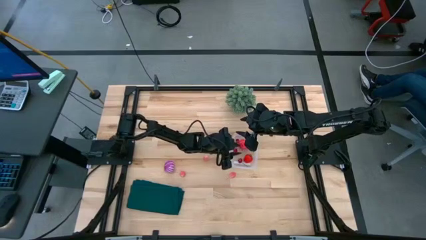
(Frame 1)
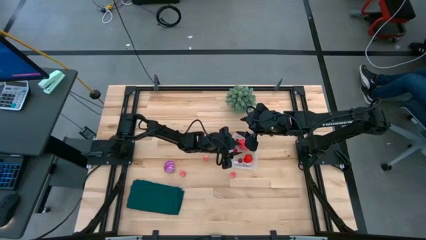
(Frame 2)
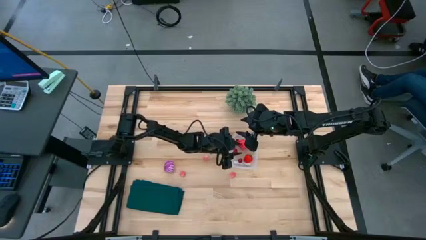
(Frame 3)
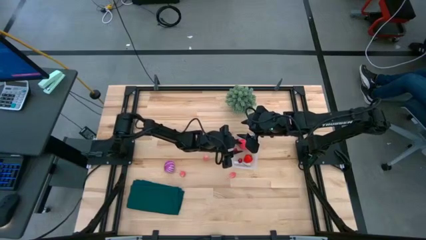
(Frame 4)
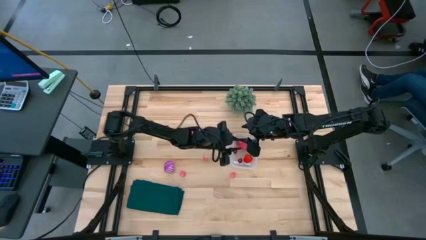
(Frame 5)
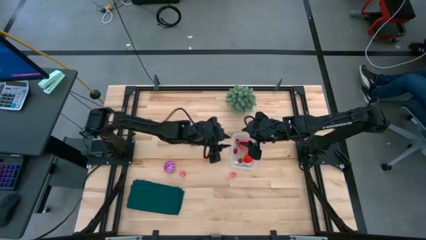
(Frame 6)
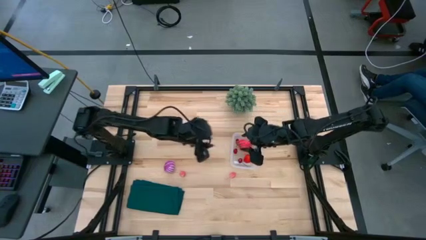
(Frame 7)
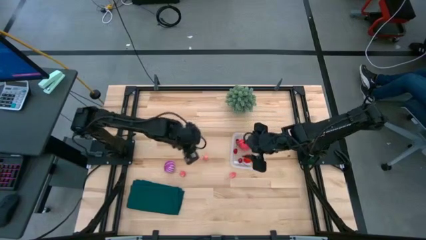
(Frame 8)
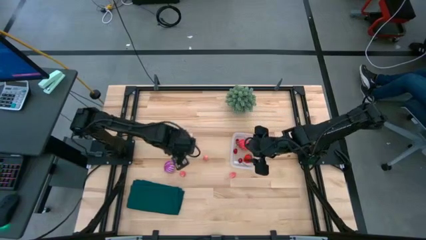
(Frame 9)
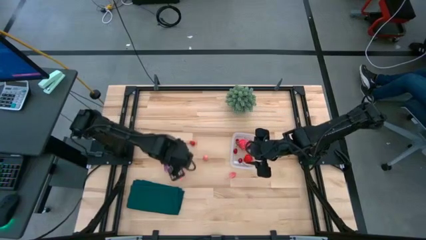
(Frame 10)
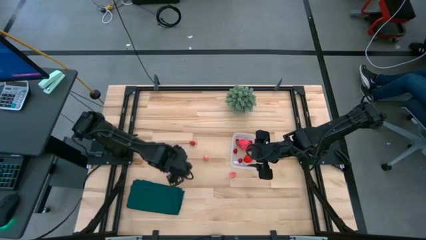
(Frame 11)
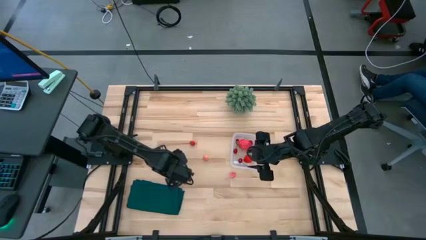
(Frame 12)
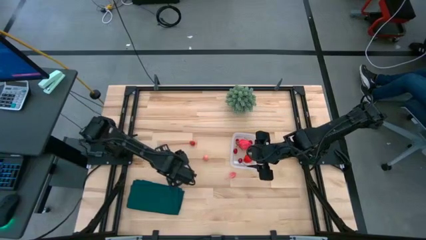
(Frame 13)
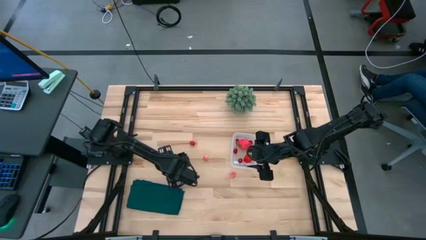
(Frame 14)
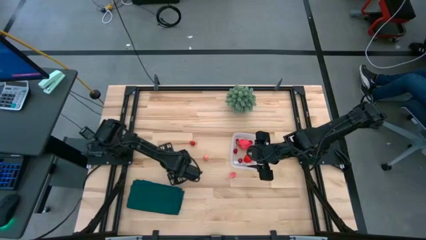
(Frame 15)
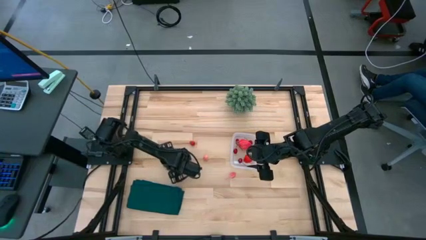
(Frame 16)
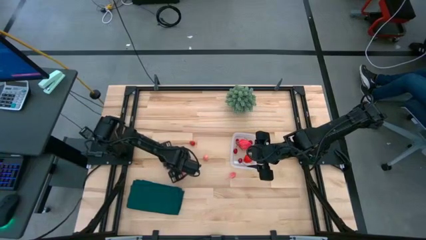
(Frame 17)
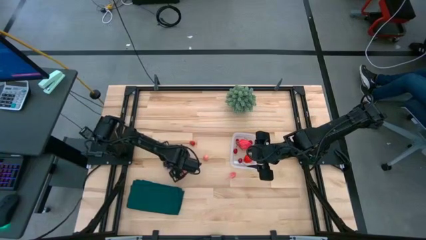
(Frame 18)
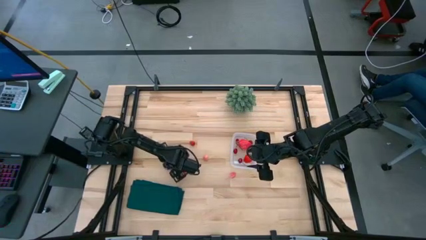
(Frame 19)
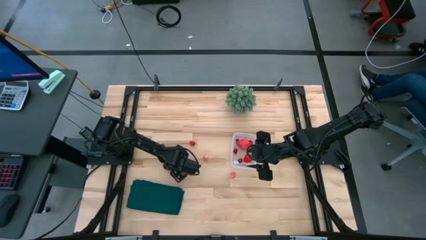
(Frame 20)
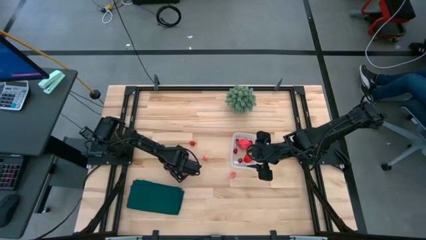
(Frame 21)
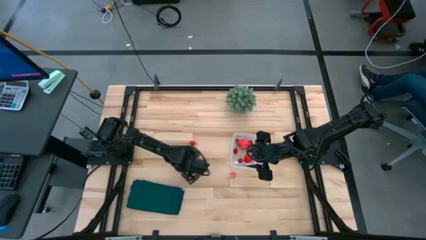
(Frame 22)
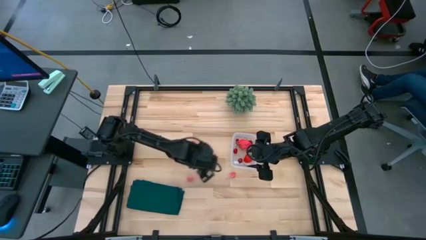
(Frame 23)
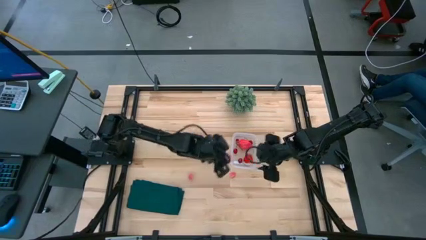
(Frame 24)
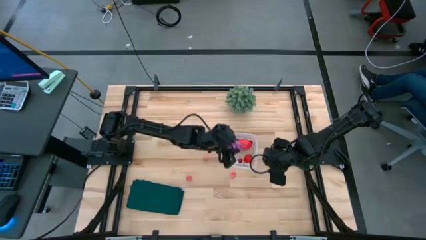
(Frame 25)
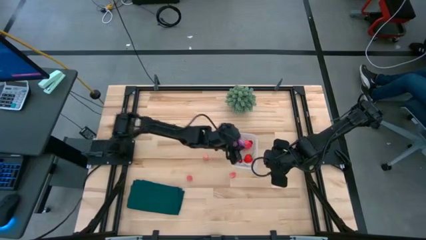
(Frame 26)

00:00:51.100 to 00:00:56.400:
Task: Pick and placing Produce into tupperware
Put the violet onion into the transparent bin

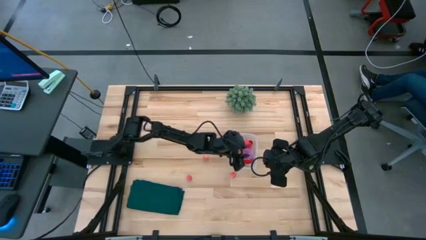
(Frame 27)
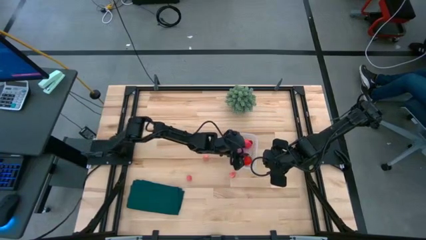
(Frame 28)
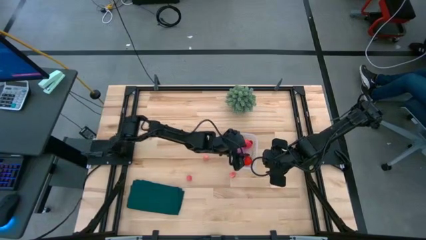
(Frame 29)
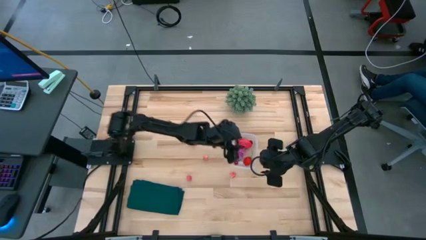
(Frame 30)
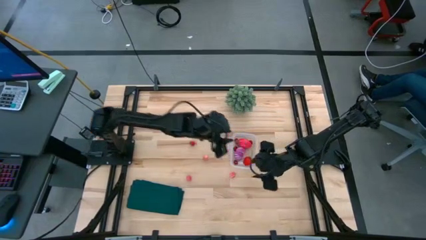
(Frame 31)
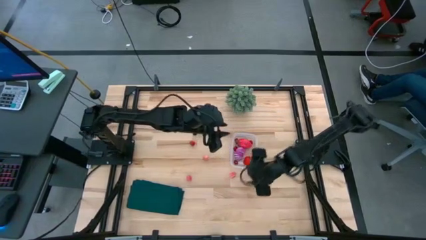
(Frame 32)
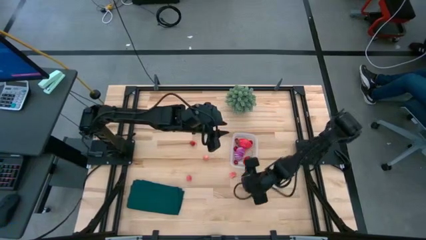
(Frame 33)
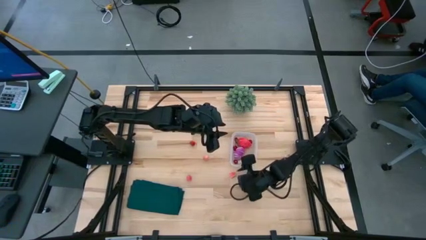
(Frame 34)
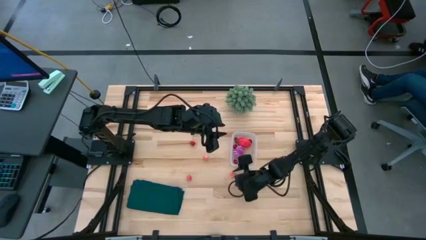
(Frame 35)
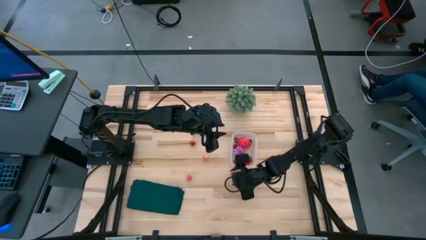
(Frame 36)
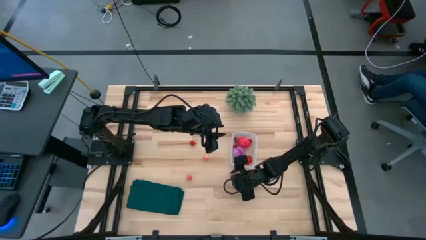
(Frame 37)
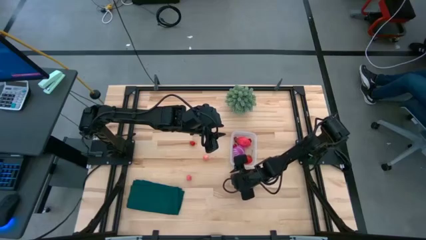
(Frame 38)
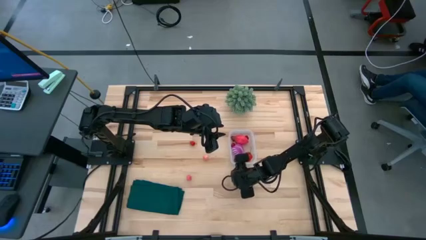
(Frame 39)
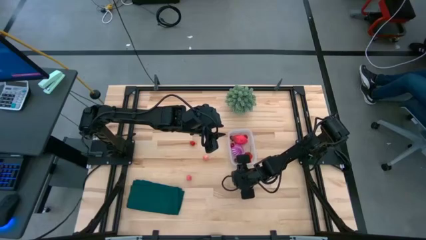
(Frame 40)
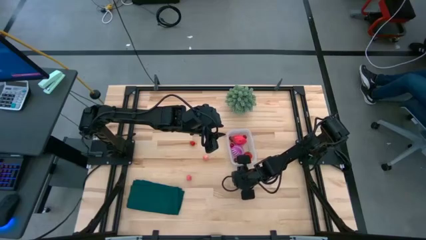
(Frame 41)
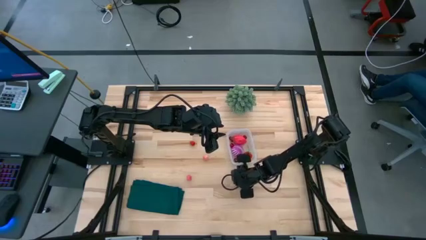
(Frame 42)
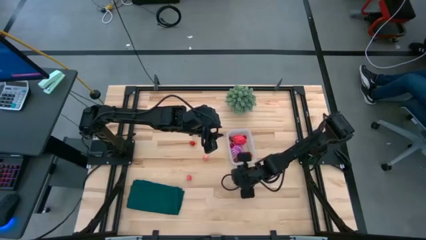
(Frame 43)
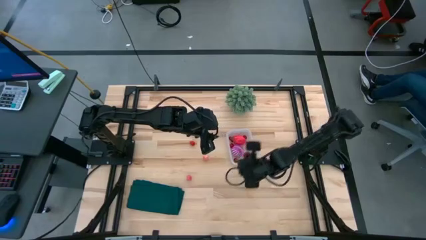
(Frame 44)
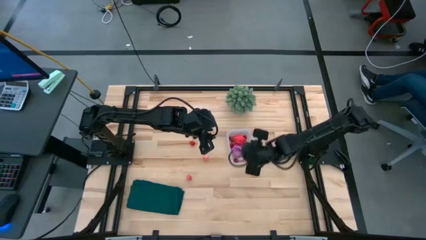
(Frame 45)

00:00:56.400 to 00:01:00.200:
Put the pink peach into the transparent bin

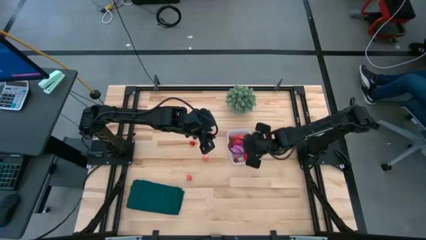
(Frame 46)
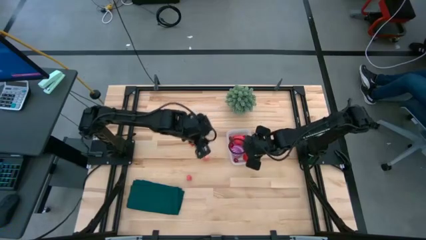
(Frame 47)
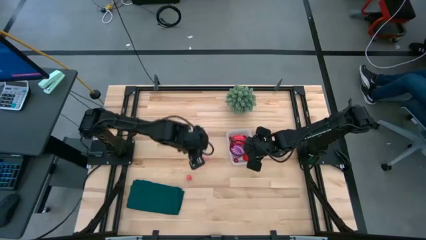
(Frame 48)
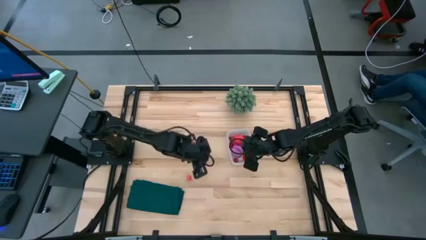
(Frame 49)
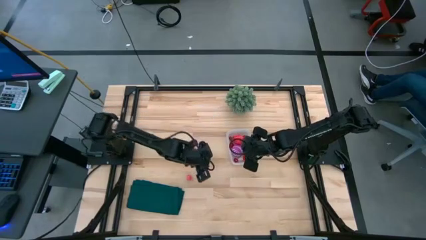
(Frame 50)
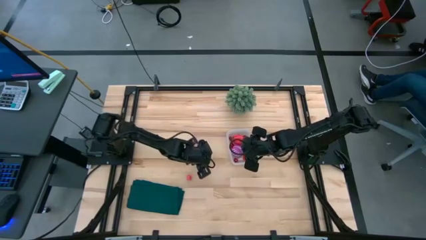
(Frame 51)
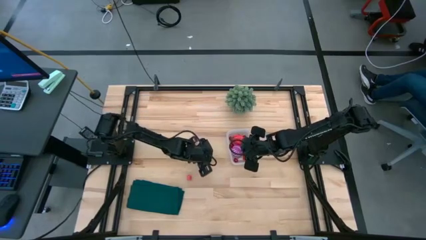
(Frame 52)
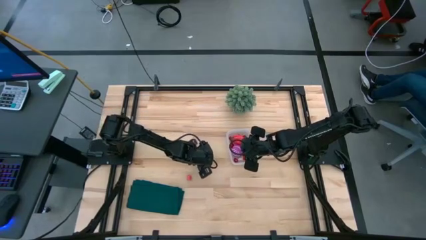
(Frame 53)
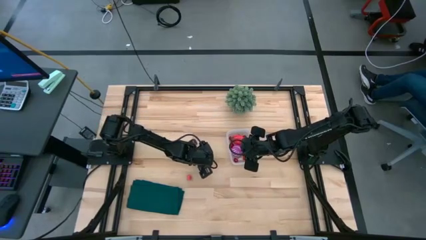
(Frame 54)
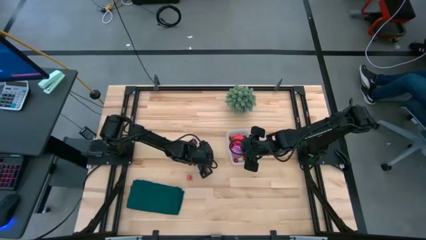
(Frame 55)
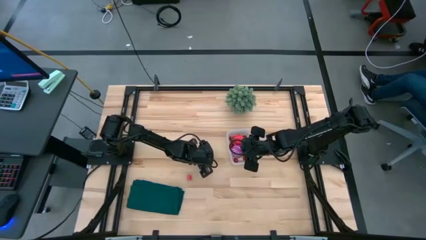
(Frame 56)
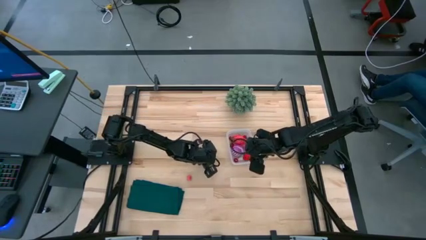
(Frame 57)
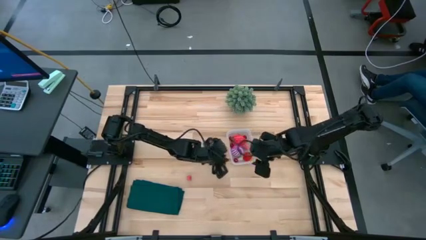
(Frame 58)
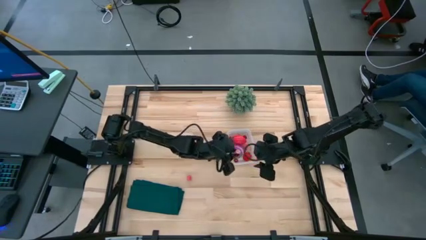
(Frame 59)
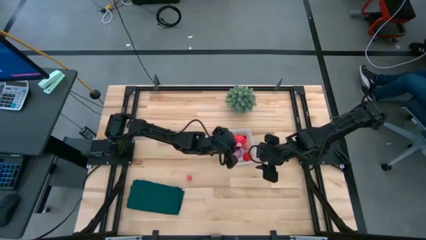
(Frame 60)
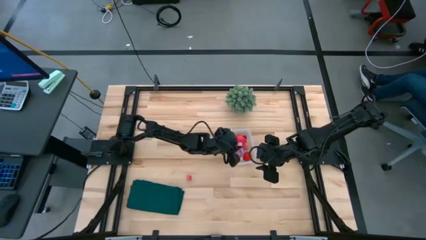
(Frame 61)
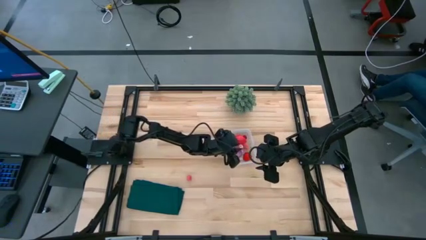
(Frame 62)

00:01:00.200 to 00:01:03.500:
Put the pink peach into the transparent bin

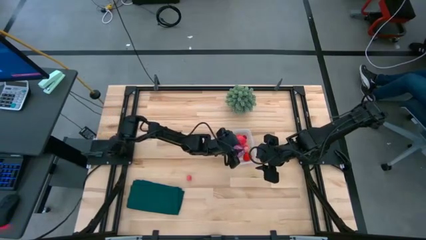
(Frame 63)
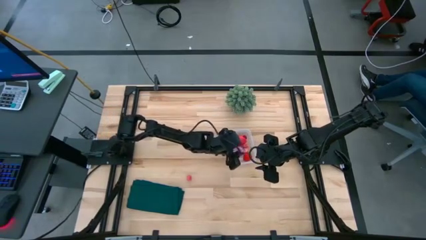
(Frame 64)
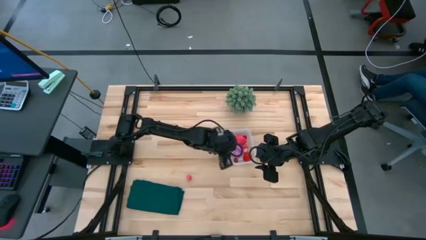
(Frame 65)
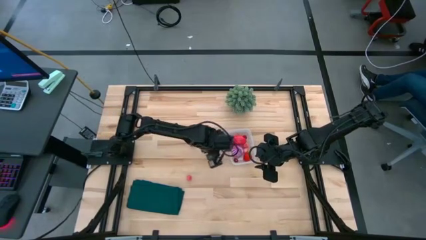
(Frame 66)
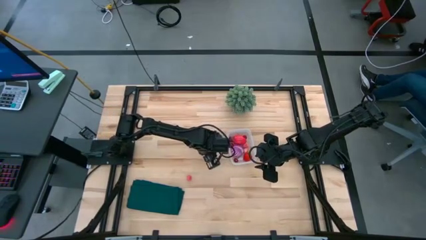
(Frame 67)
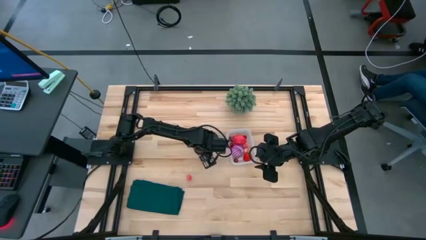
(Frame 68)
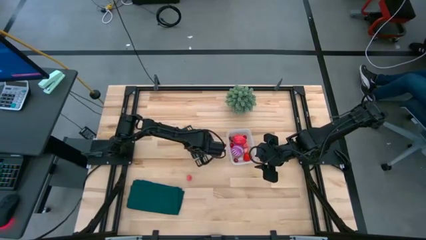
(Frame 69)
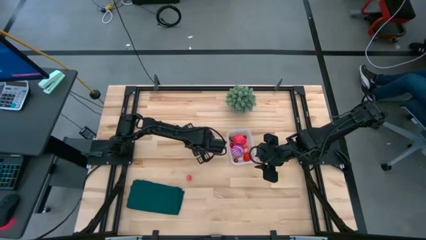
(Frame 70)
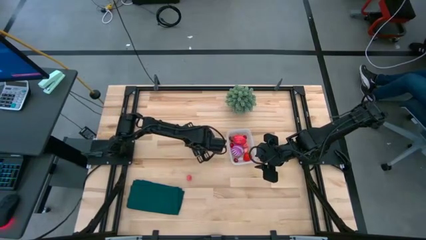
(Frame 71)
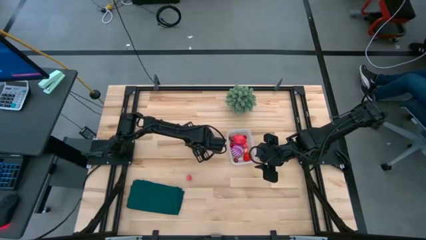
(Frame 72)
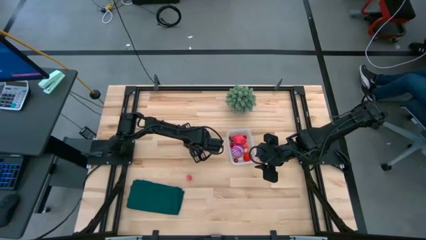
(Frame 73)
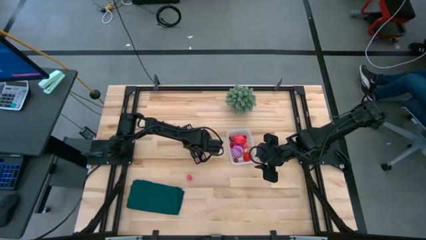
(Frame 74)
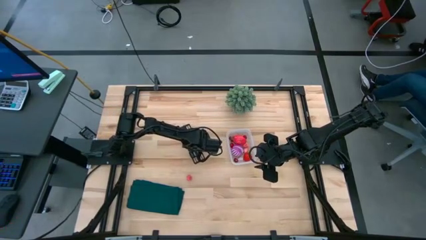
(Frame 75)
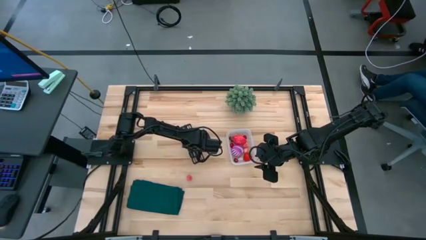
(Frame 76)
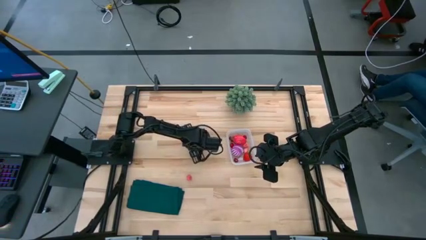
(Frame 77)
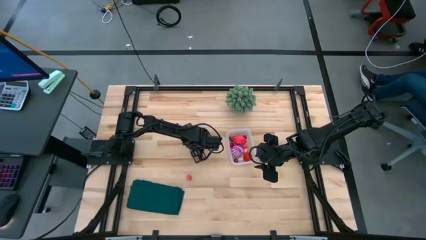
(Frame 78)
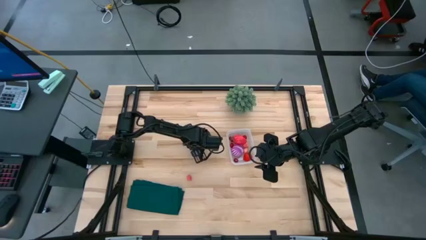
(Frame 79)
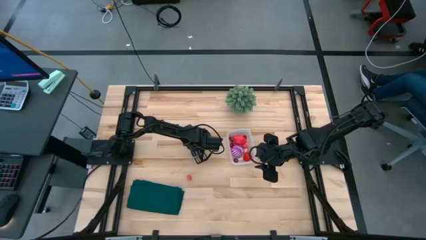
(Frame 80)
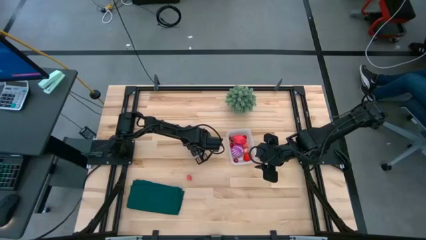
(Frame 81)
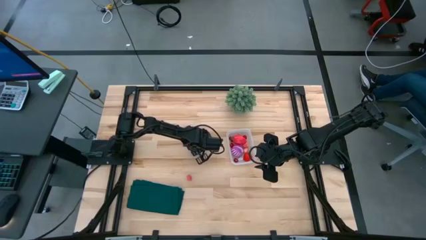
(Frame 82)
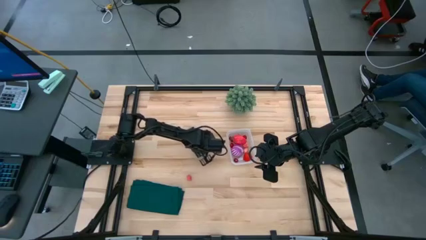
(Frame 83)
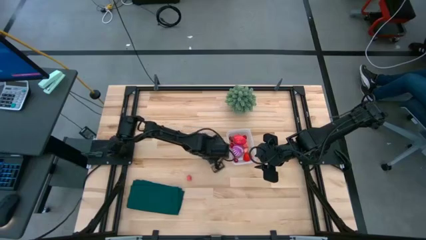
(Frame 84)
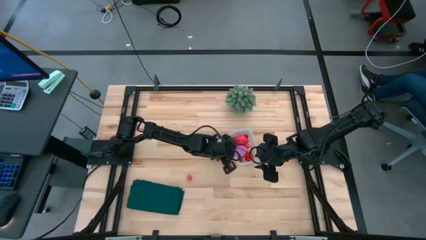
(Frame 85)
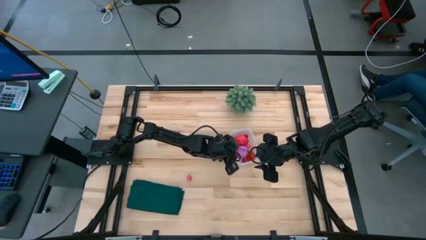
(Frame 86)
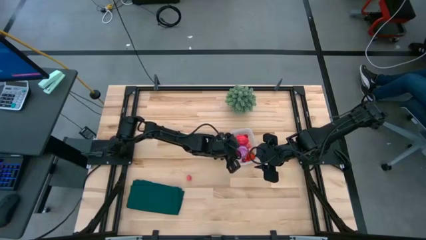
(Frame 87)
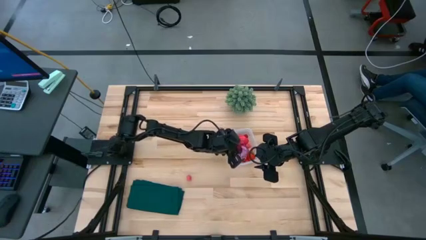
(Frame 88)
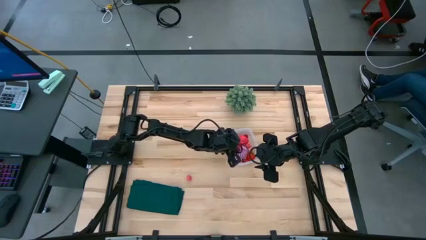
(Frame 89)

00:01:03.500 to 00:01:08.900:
Put the red raspberry into the transparent bin
